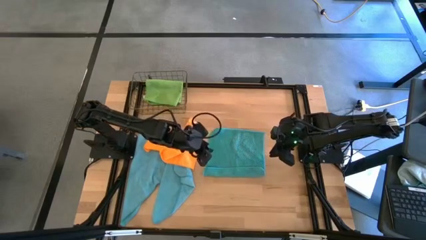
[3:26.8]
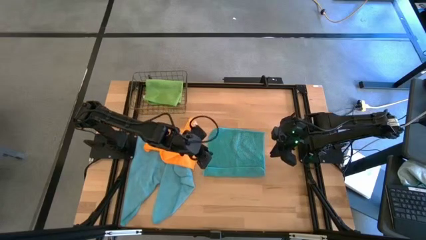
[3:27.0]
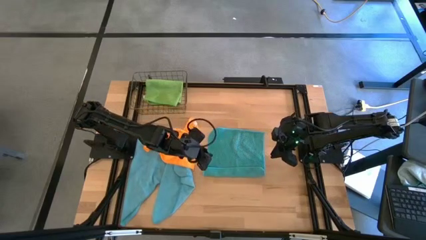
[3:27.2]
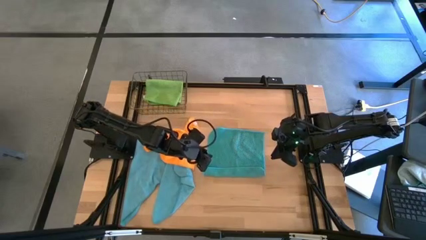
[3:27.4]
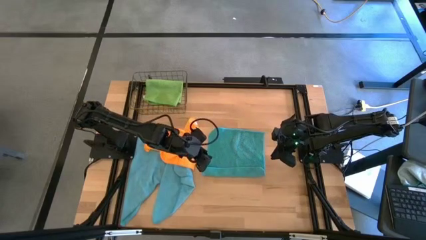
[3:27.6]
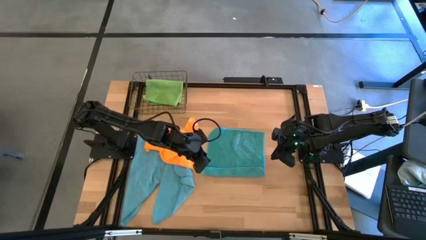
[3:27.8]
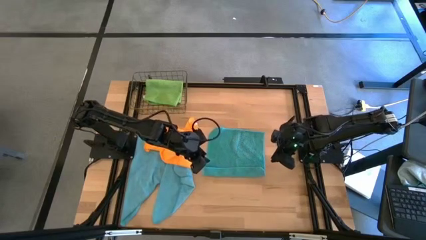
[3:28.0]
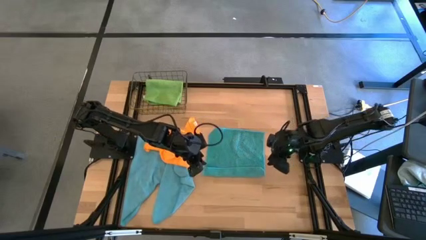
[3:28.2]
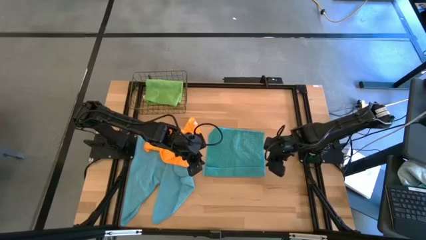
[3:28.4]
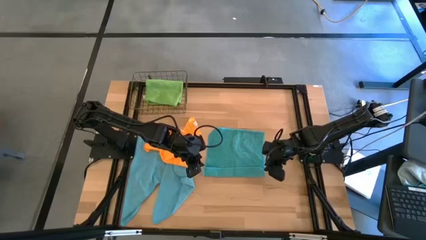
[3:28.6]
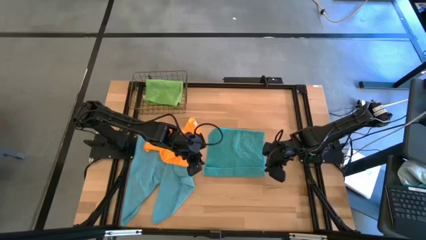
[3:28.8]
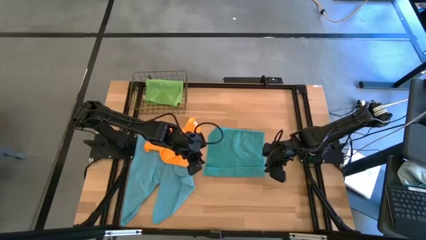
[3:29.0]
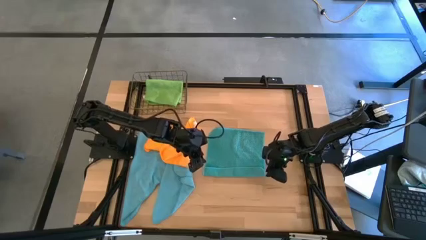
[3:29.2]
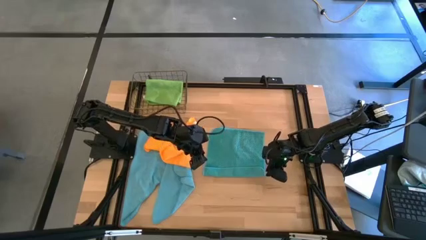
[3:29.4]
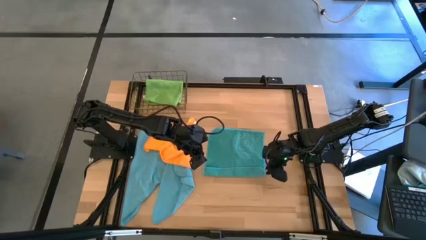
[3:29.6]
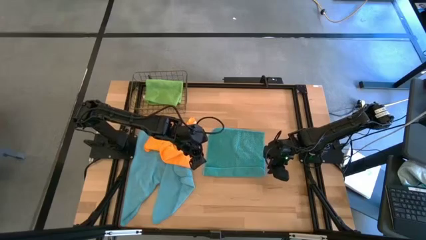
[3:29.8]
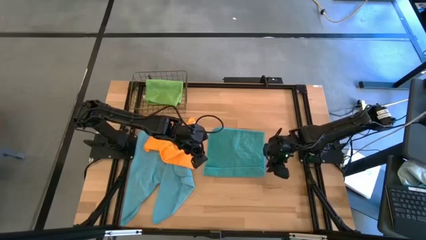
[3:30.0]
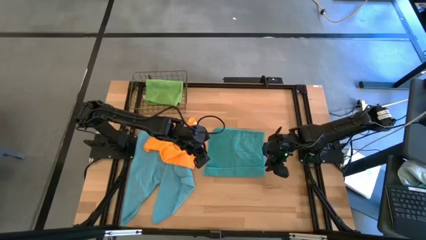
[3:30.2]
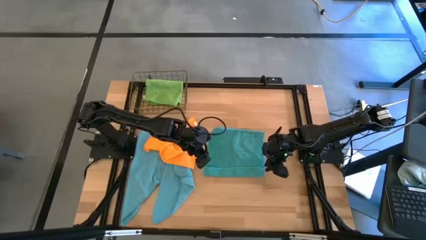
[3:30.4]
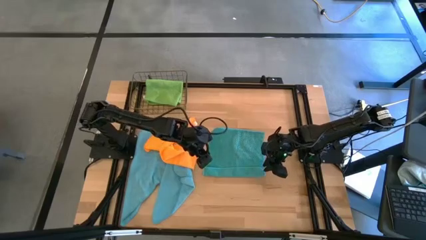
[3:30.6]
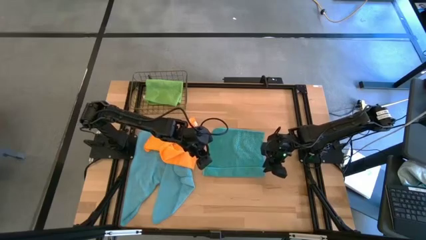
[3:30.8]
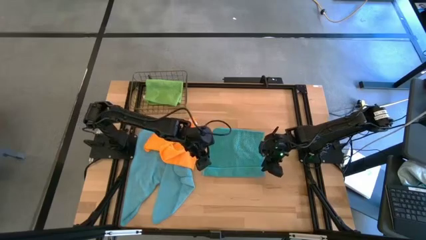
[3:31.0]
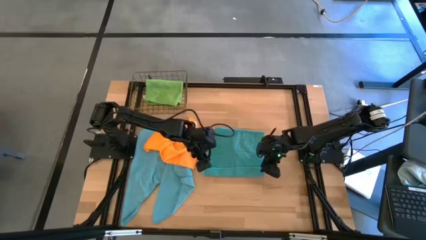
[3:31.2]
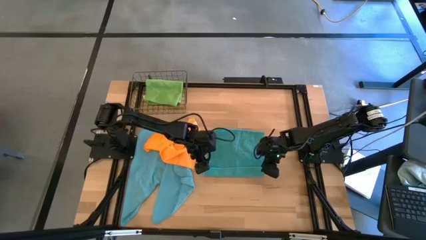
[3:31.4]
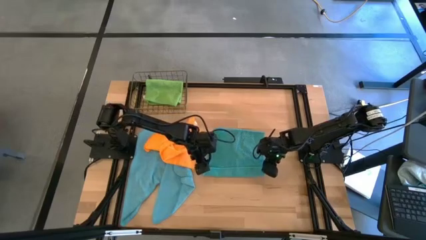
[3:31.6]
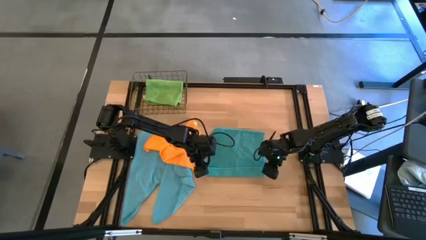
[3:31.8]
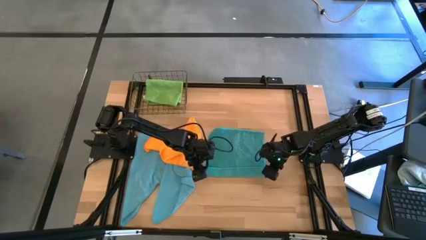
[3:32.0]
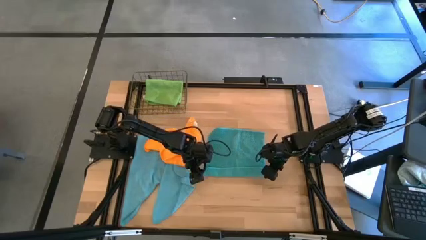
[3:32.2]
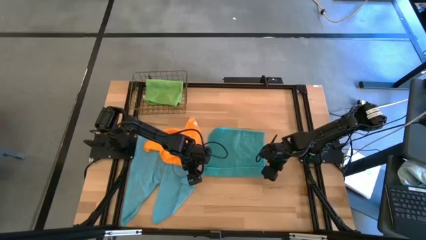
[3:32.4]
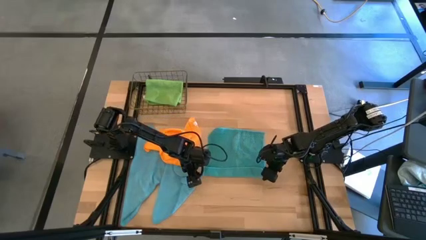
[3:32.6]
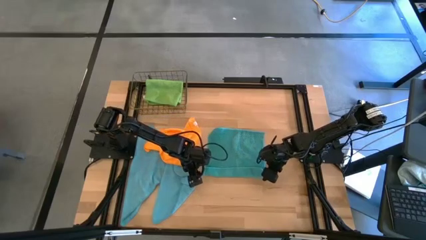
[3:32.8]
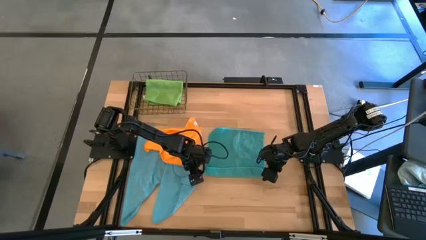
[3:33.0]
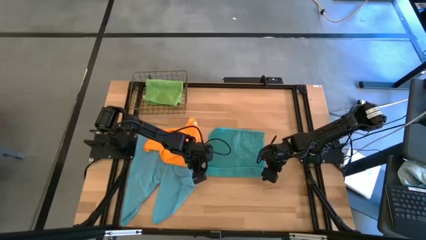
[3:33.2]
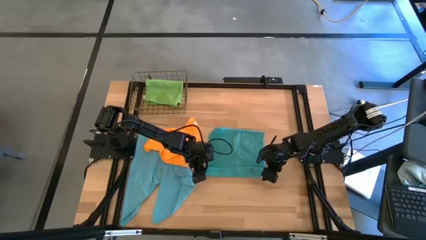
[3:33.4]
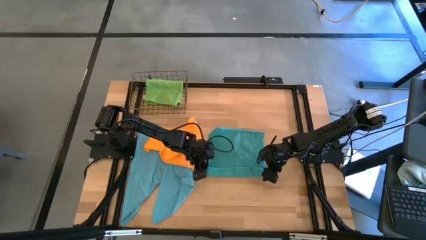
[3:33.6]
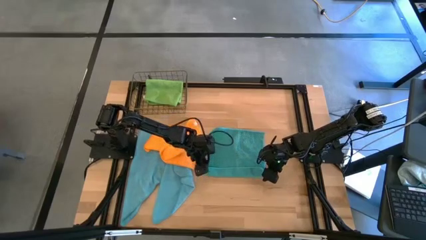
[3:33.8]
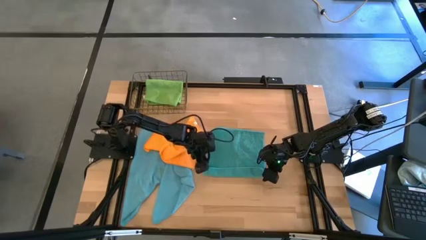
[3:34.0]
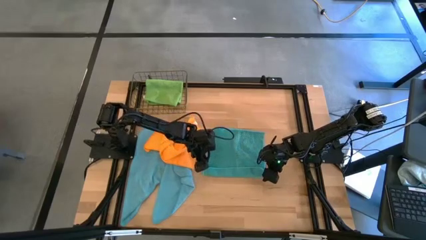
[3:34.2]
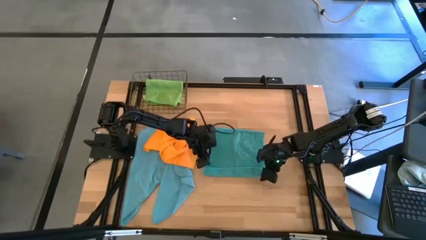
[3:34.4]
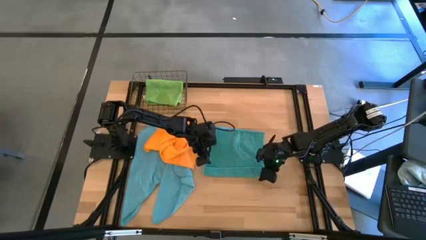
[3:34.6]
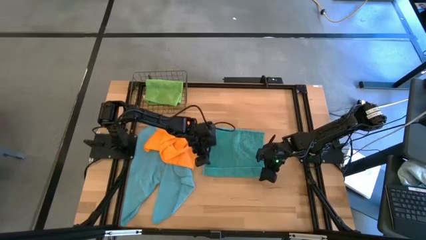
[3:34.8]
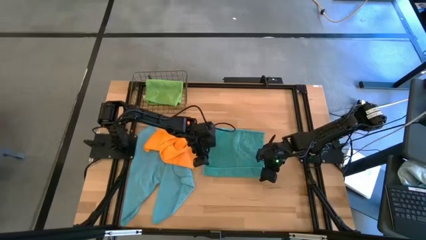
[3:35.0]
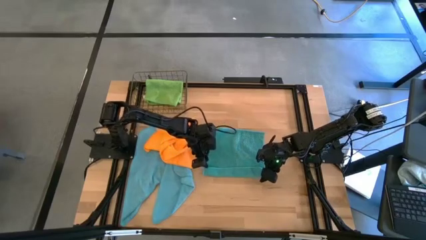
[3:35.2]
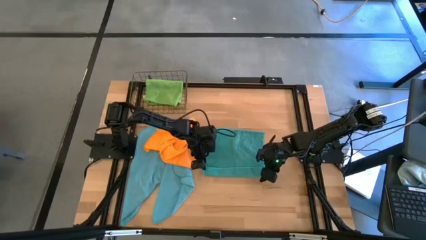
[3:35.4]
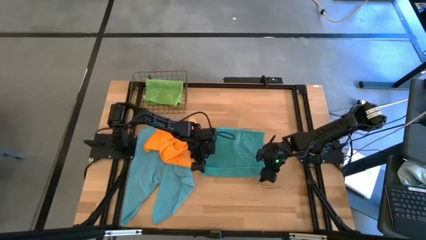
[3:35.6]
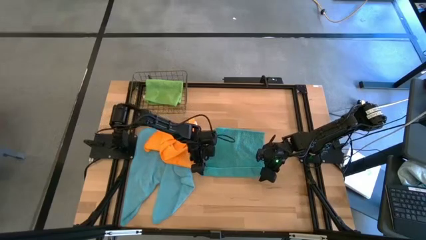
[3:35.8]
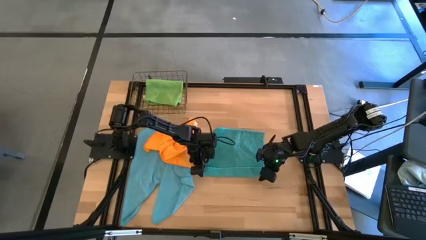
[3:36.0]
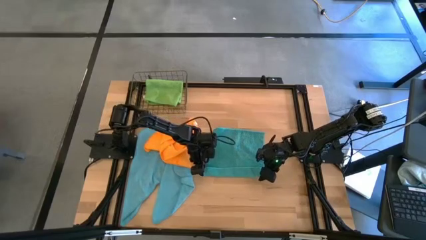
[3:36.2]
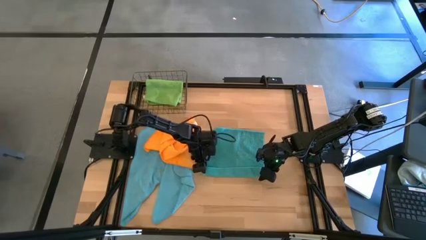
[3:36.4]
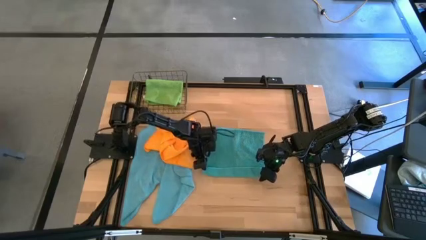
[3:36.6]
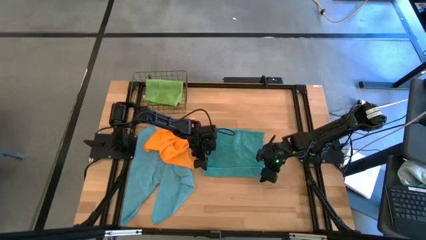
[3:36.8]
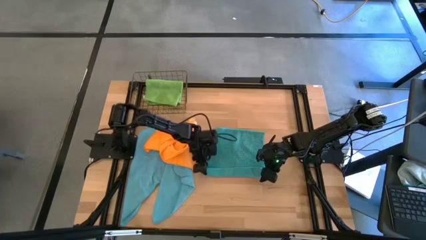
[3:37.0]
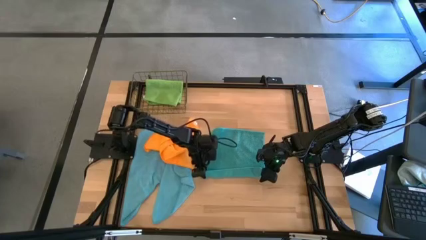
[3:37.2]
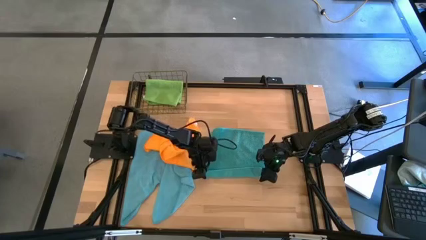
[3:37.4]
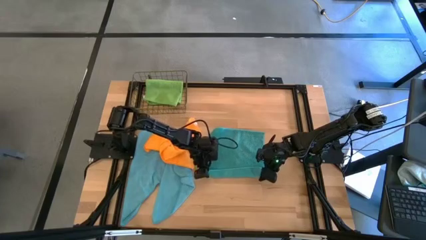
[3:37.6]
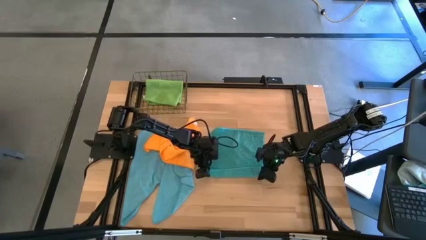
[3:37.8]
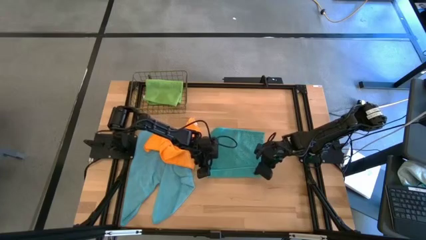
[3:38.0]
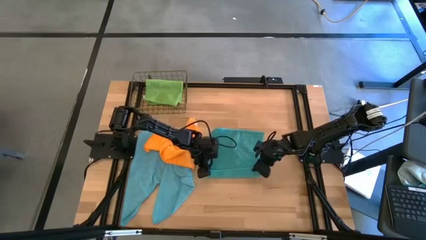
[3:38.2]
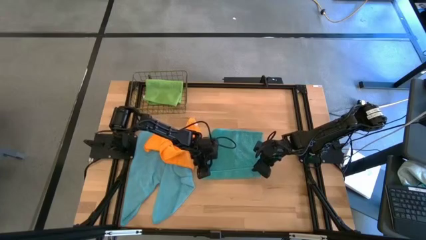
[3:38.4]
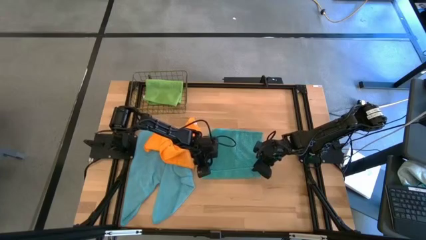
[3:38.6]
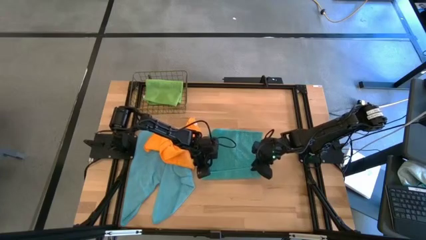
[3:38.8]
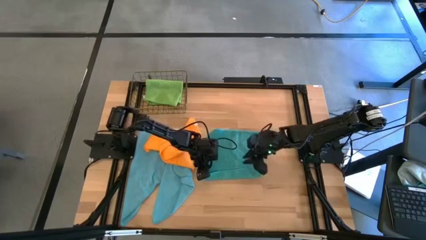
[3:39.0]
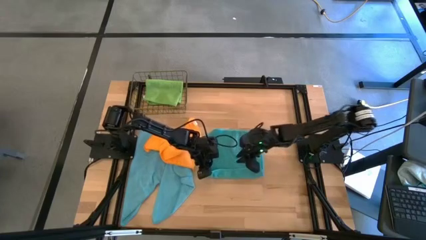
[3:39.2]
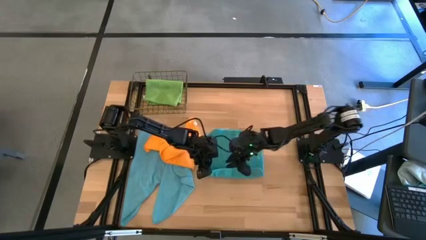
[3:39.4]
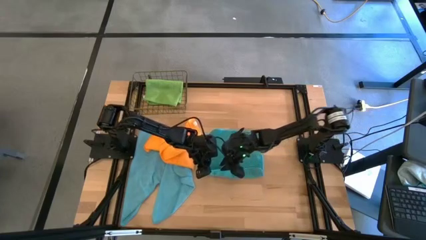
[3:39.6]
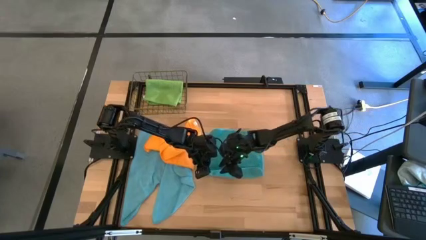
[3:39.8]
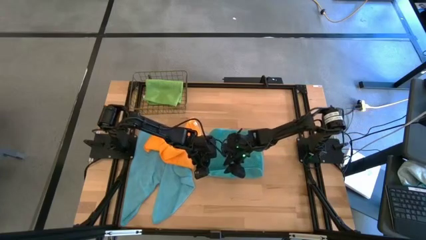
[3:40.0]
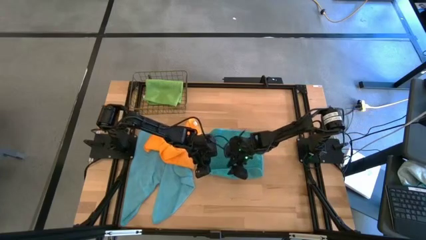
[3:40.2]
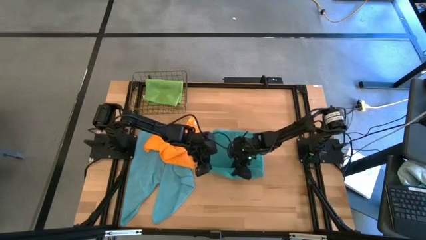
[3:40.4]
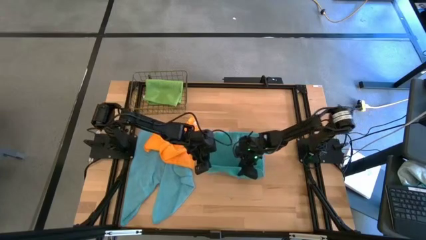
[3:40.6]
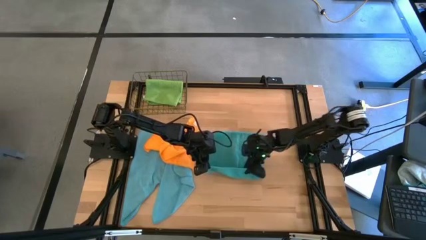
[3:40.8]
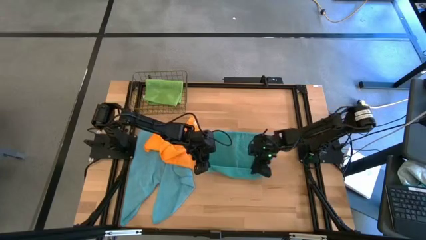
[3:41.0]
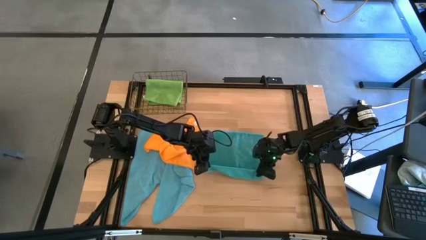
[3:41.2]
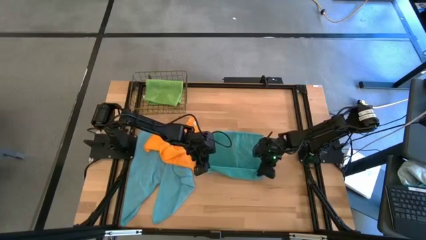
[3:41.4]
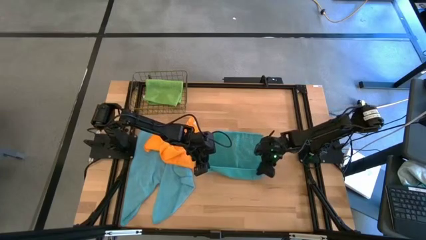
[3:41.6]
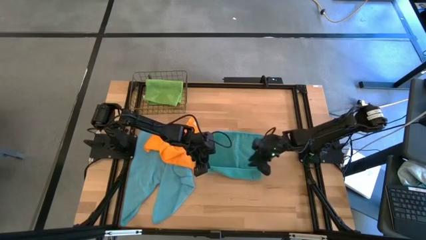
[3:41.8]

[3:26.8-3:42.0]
Task: Fold microfiber towels
Fold the blue microfiber cloth
